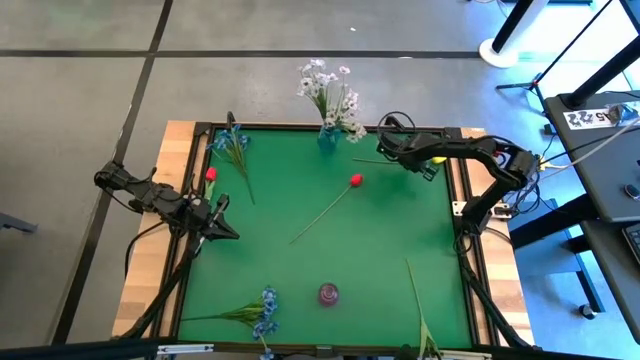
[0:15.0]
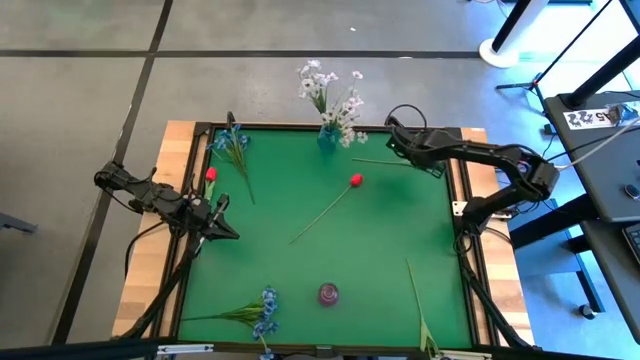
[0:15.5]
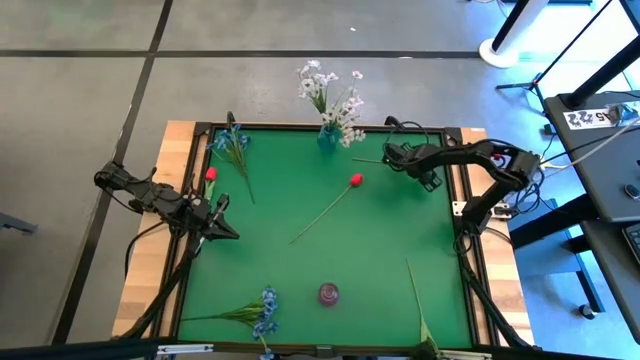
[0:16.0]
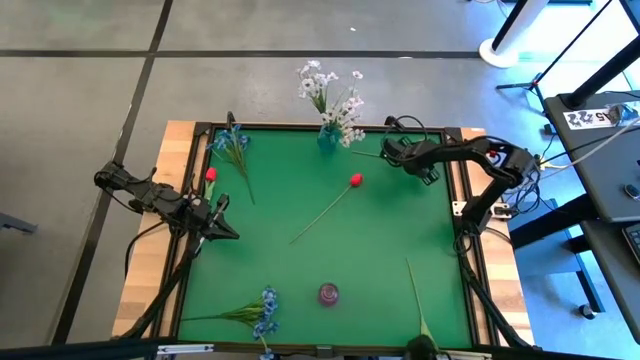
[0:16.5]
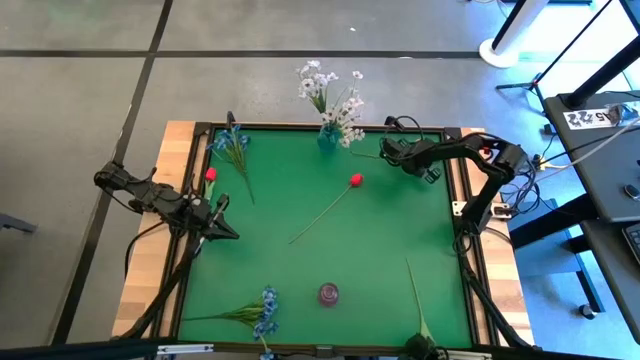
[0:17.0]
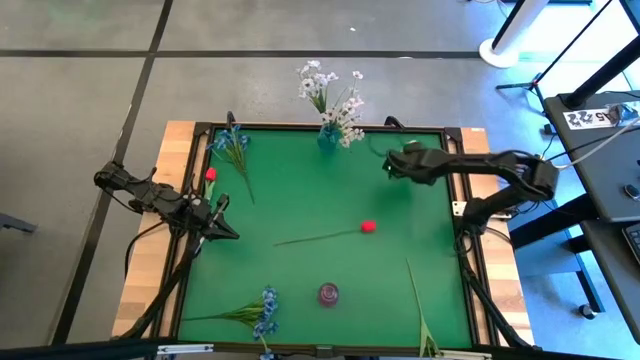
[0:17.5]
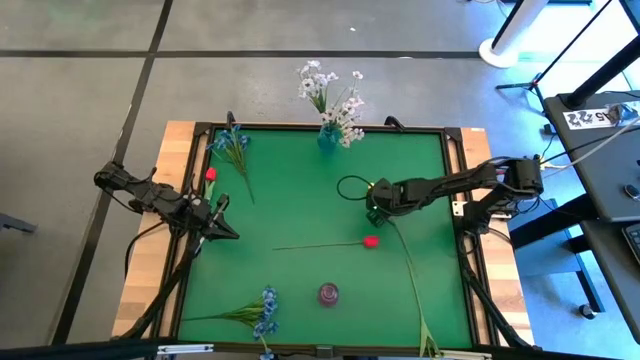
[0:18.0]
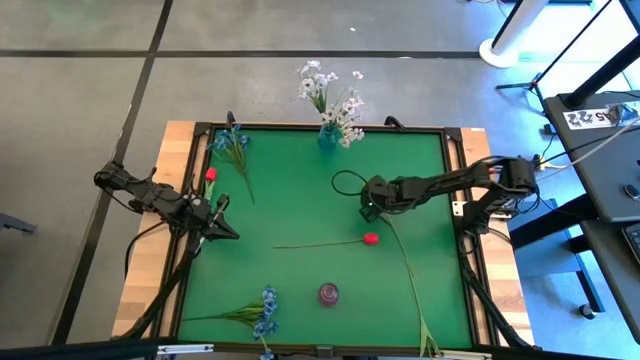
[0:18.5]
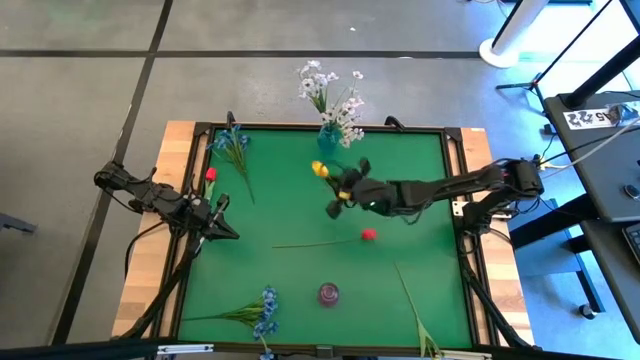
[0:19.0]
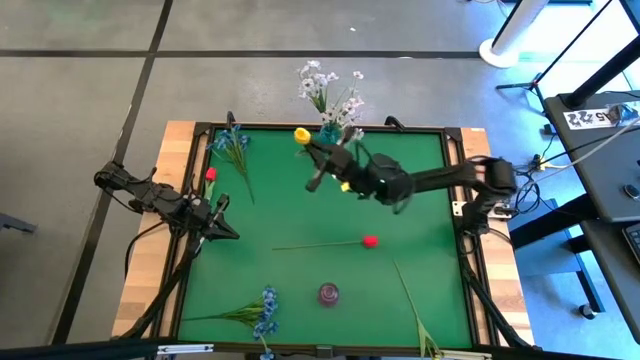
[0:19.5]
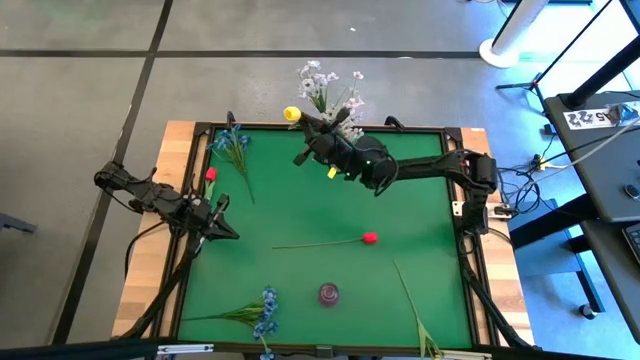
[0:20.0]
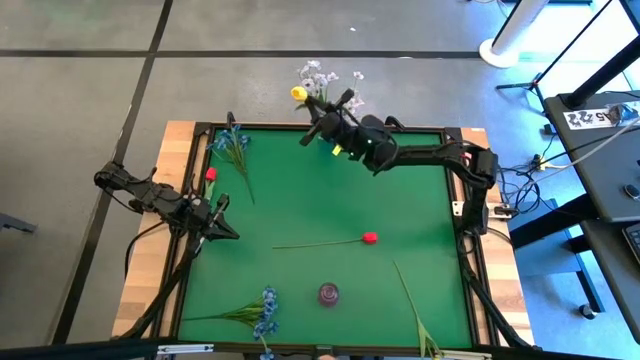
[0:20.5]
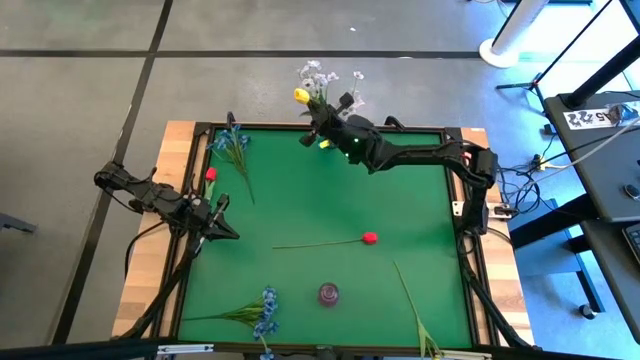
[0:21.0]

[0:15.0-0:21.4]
Task: Sort flowers into vase by color
Put the top yellow tulip into the blue flower vase

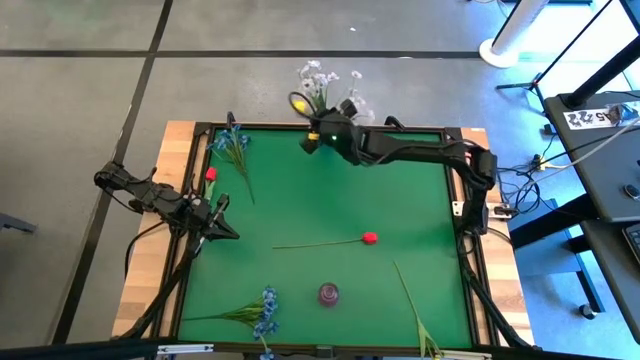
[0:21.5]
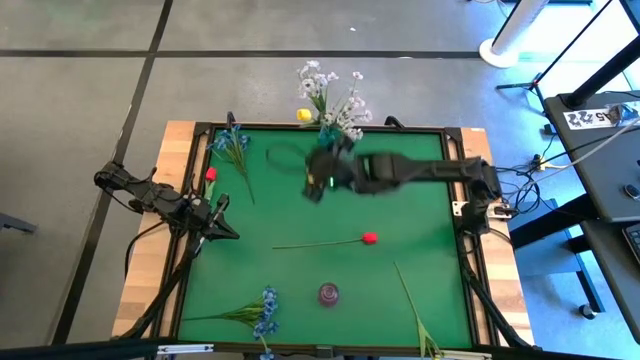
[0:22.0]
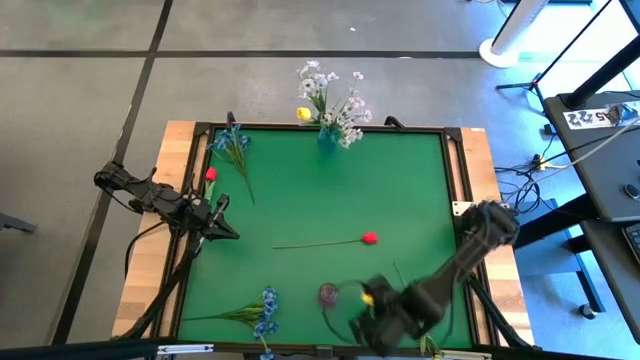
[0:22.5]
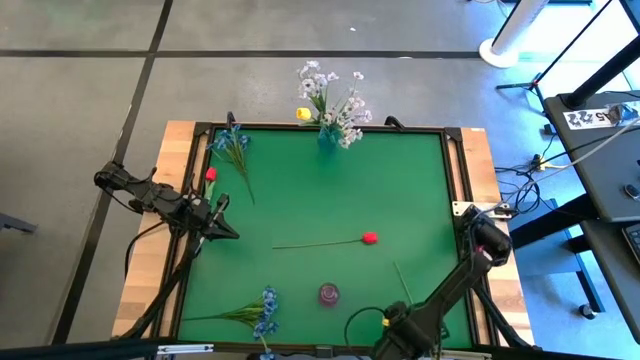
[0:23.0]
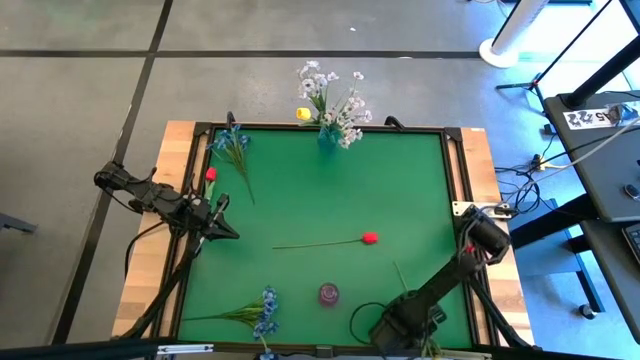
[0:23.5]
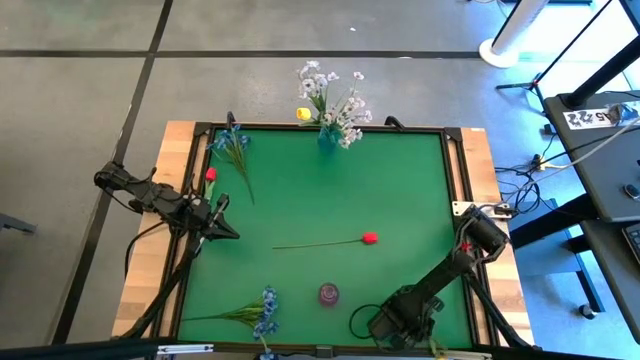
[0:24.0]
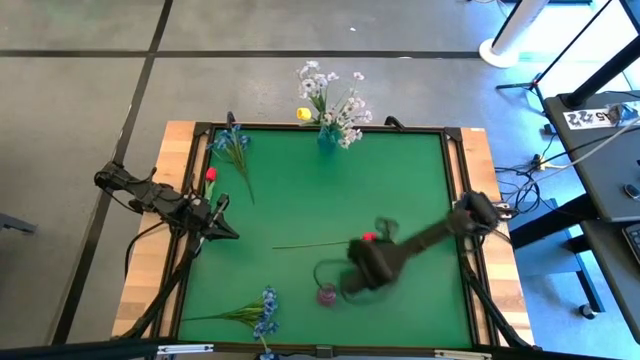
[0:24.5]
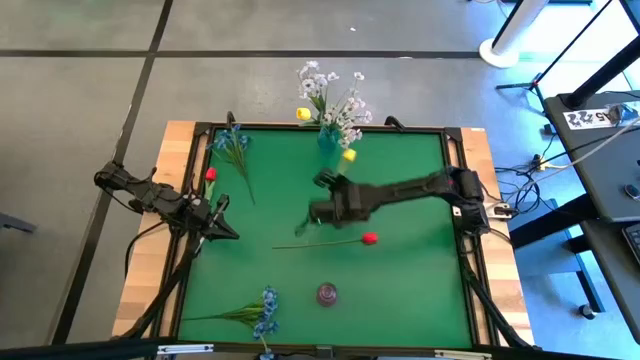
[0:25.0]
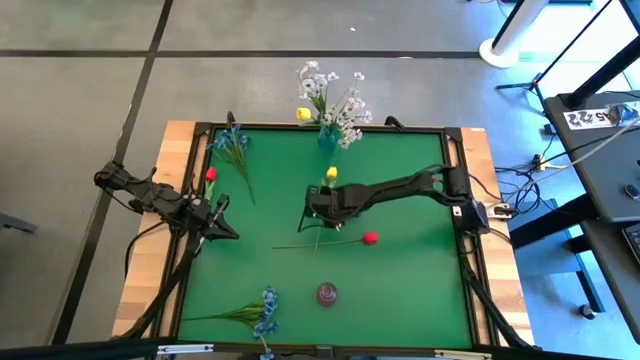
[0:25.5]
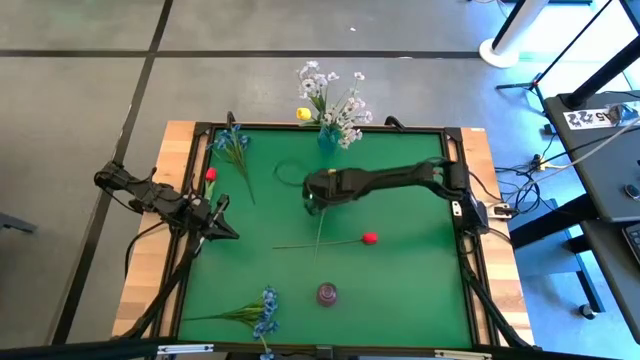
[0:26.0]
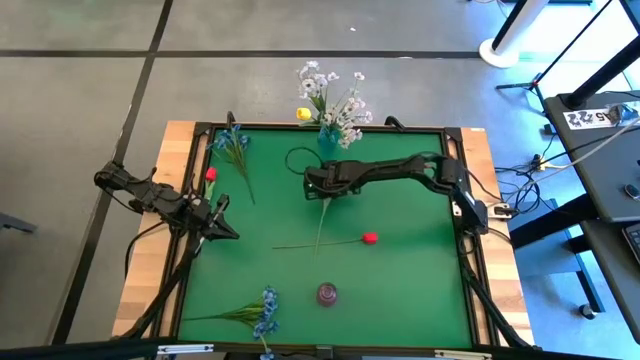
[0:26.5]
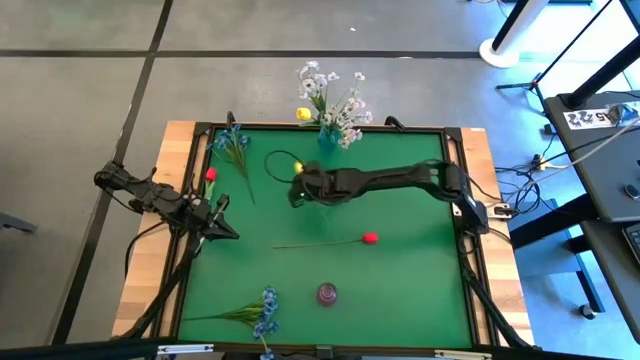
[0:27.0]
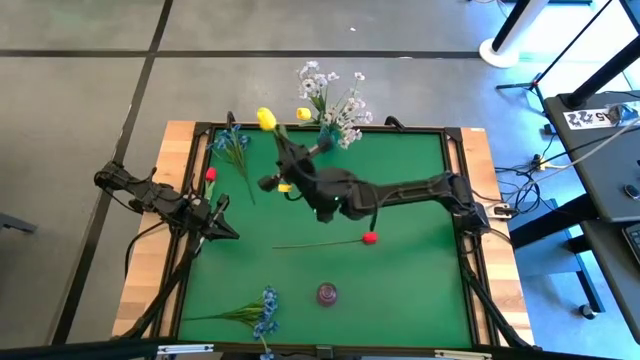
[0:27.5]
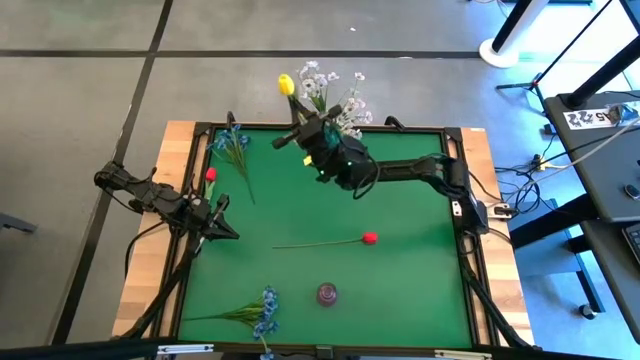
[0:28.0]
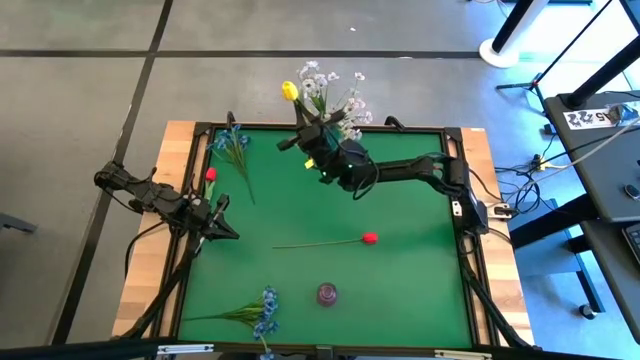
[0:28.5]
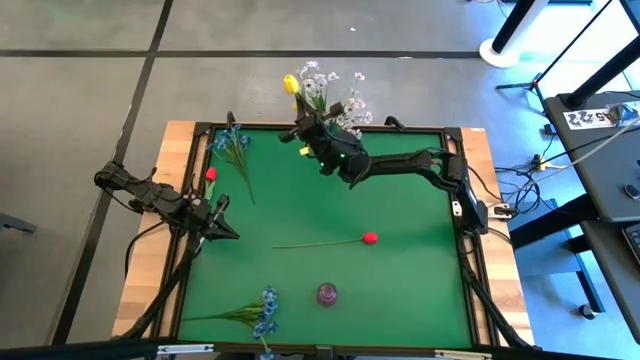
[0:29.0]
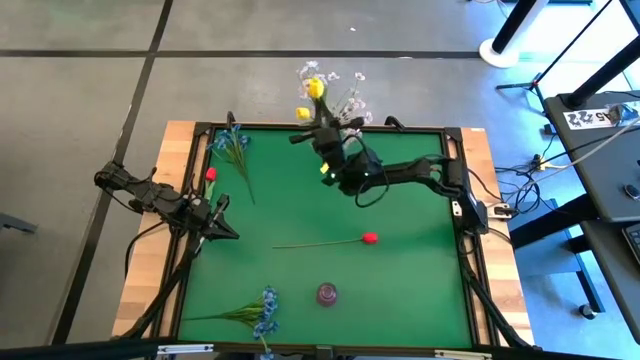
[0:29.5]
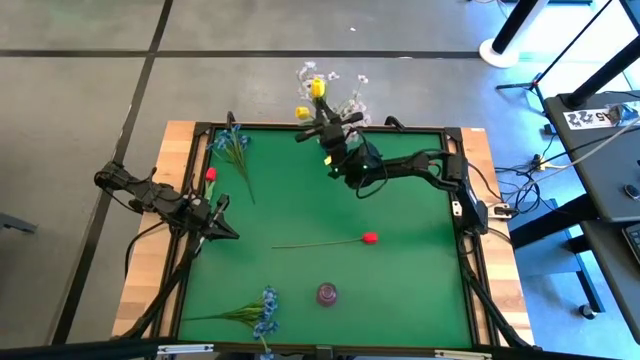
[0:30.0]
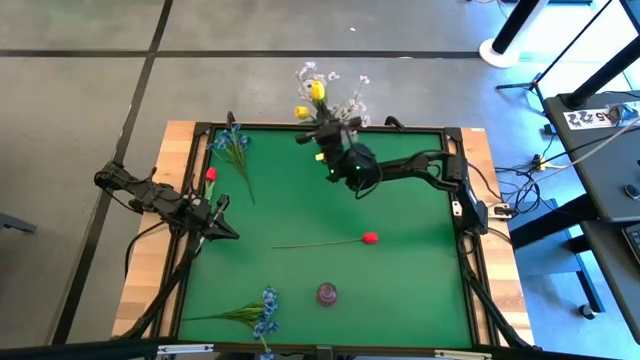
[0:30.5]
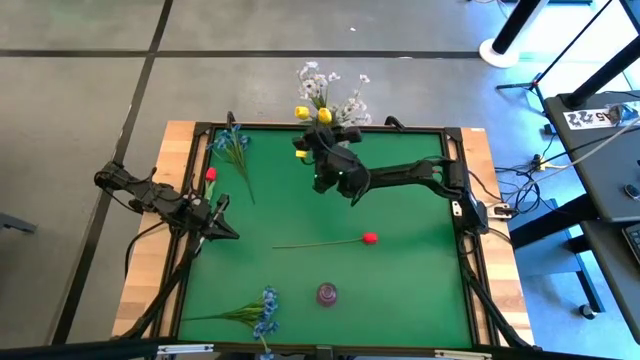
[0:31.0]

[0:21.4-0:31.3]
Put the yellow tulip into the blue flower vase

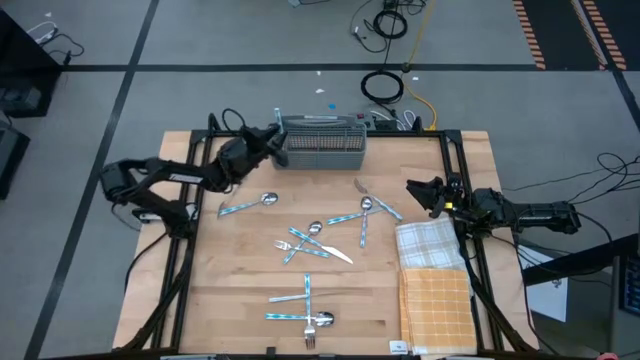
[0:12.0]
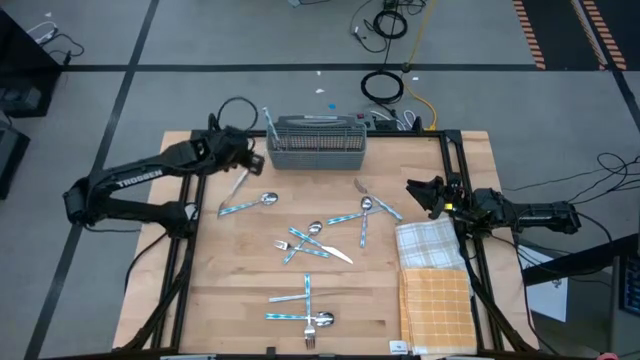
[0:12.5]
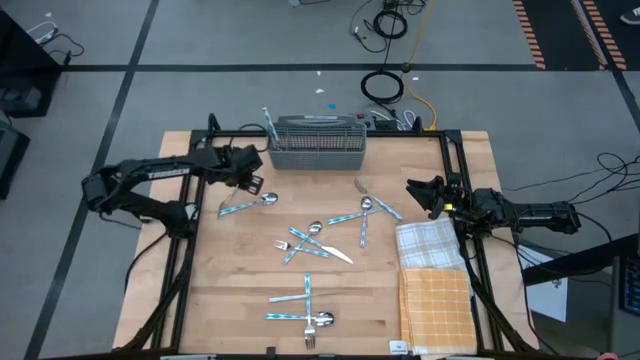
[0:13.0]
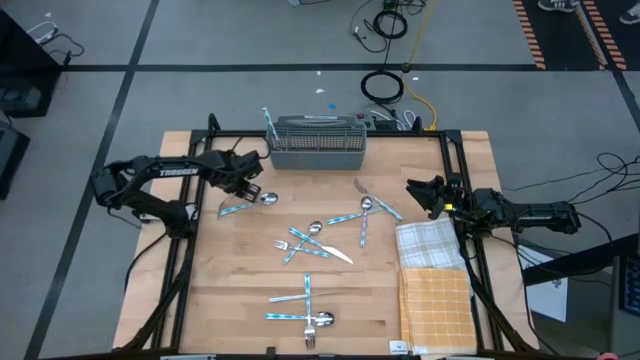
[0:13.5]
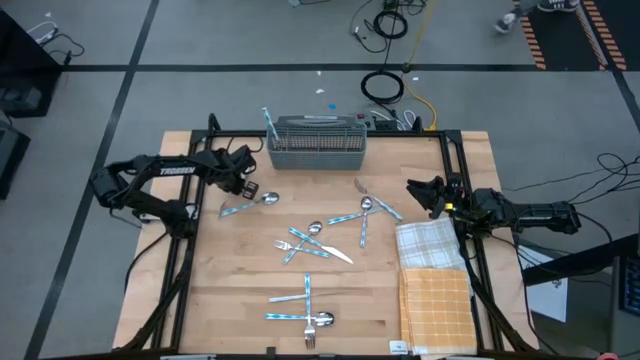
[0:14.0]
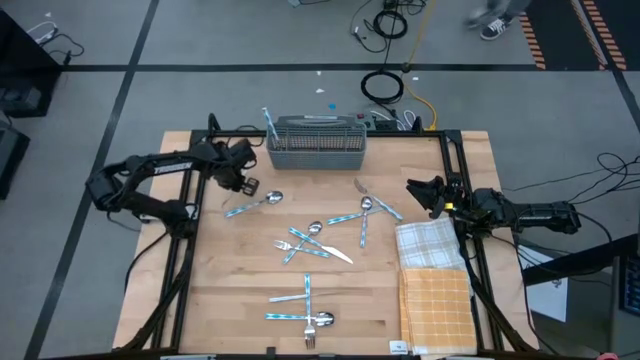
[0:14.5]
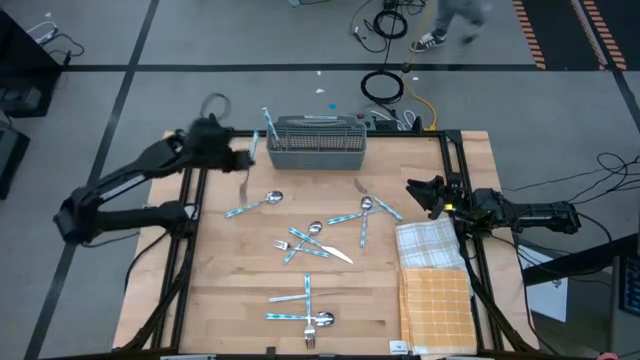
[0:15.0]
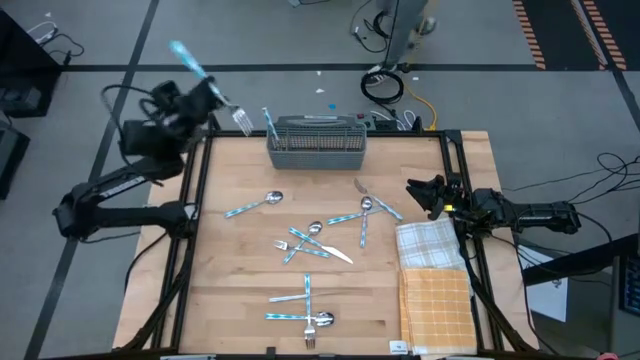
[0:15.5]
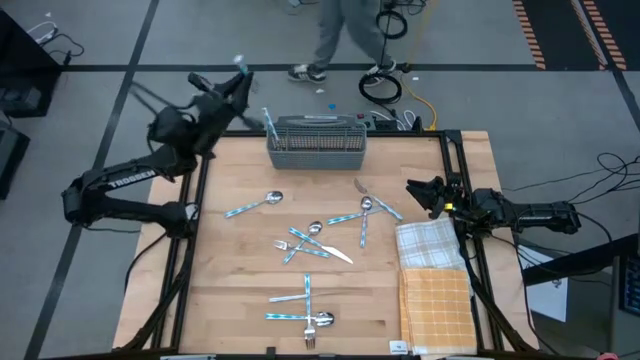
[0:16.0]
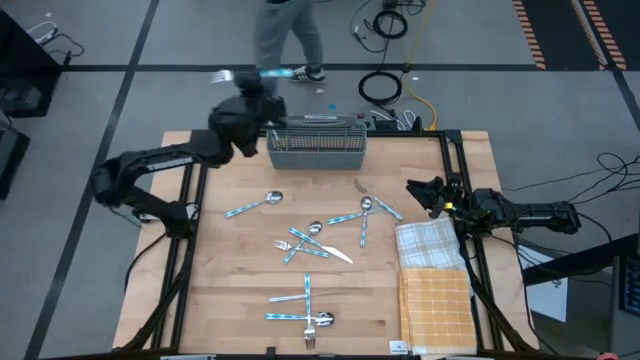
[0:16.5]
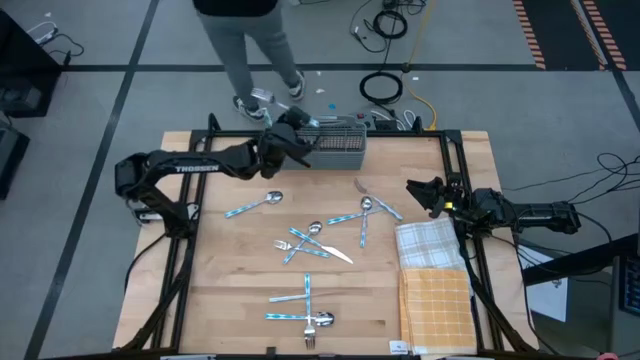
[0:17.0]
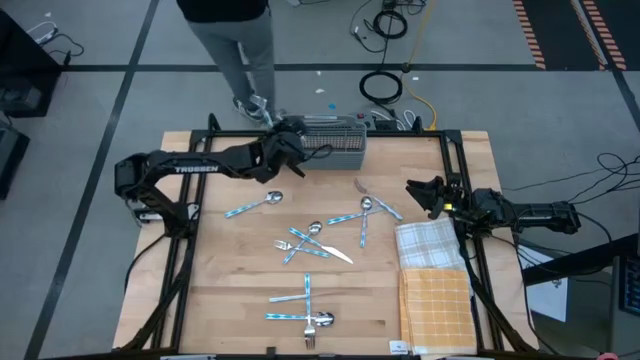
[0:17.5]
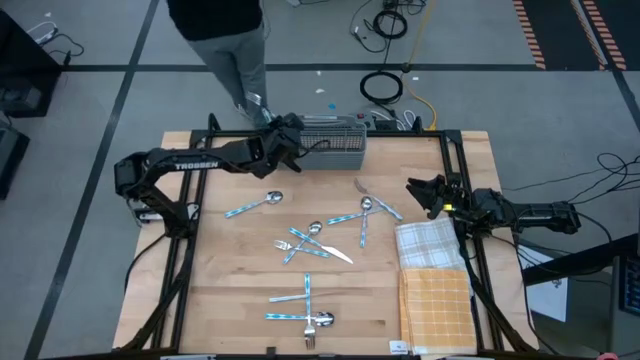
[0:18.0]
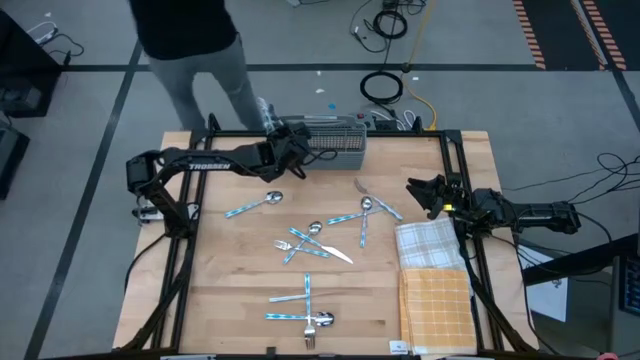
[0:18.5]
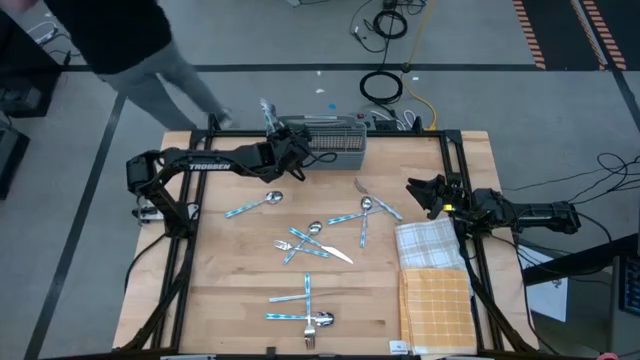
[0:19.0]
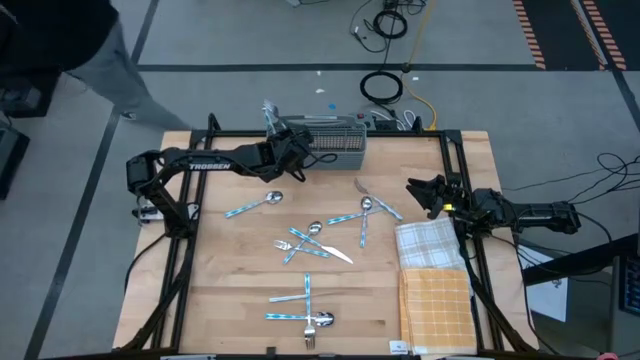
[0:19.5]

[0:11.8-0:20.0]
Task: Sort silverware
Put the fork into the middle left section of the utensil holder
